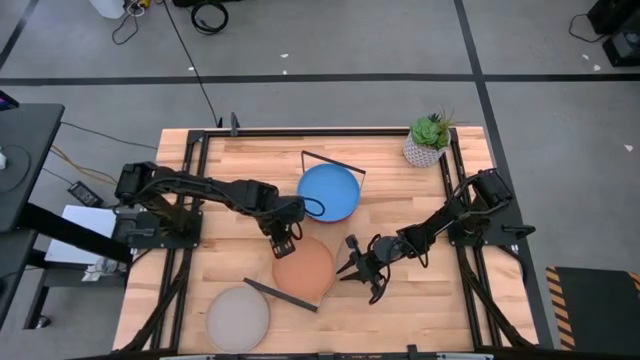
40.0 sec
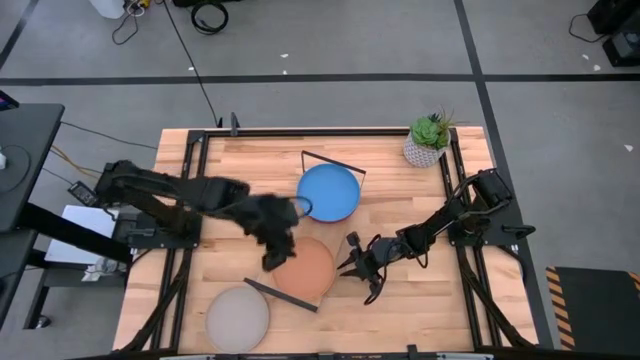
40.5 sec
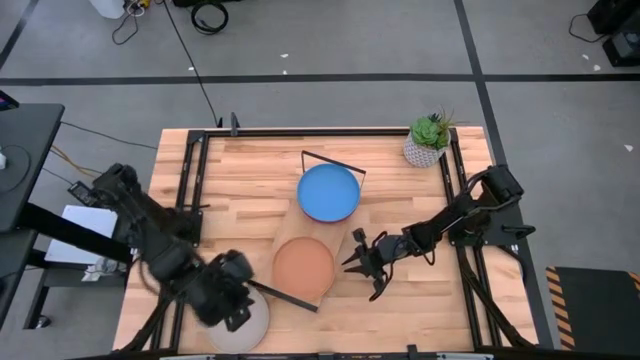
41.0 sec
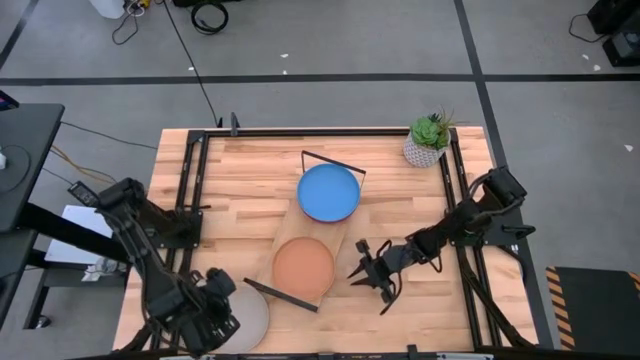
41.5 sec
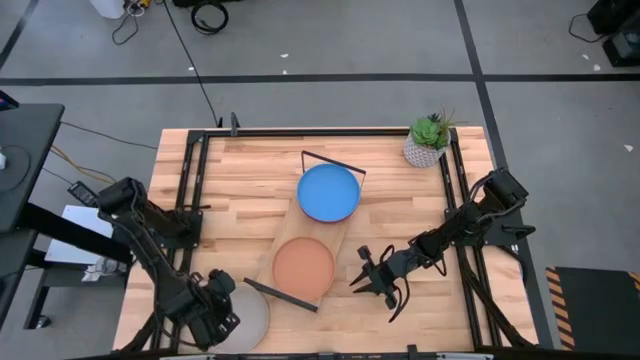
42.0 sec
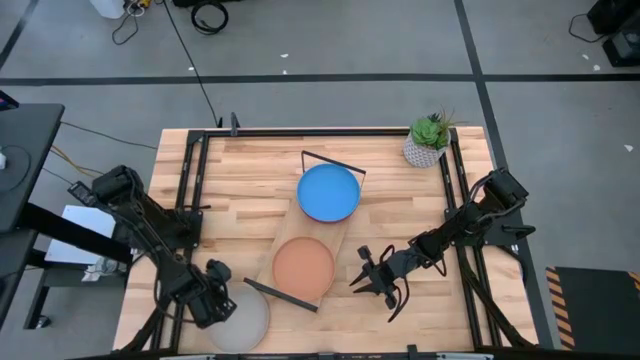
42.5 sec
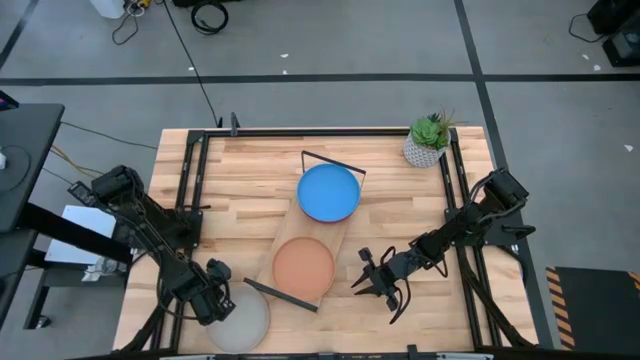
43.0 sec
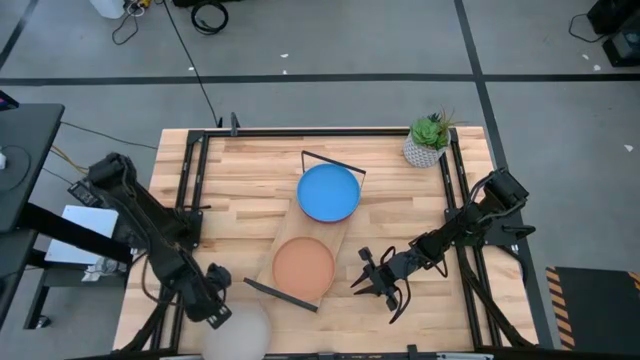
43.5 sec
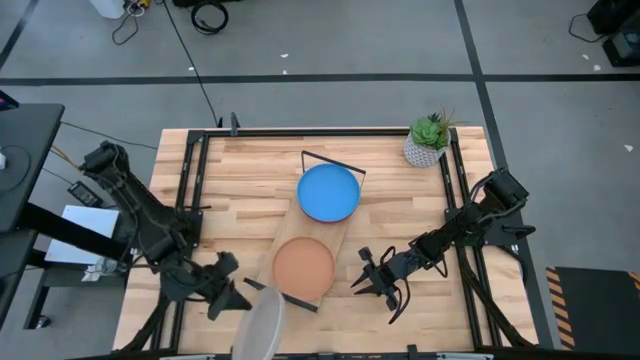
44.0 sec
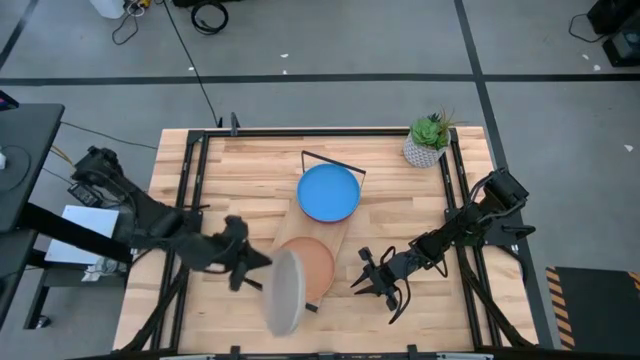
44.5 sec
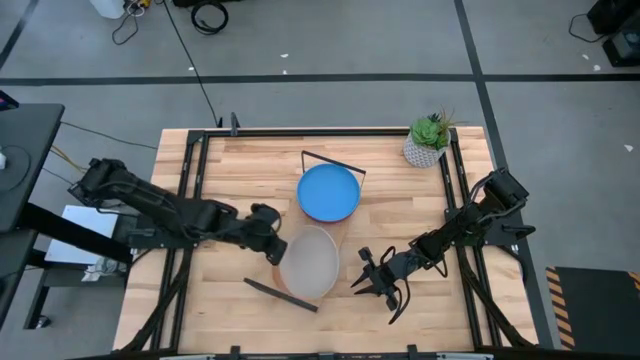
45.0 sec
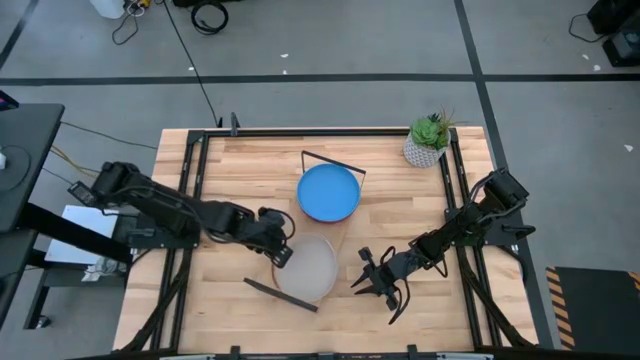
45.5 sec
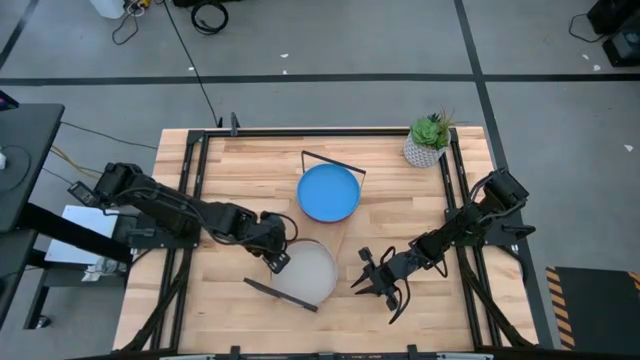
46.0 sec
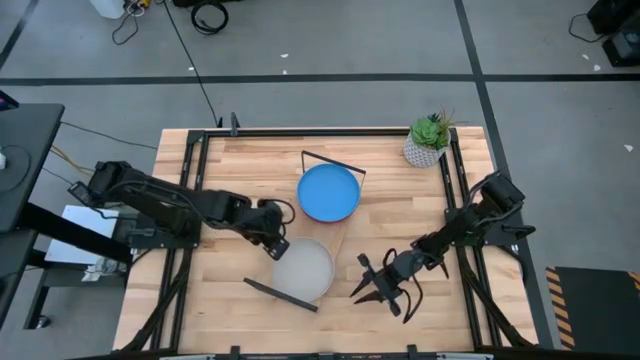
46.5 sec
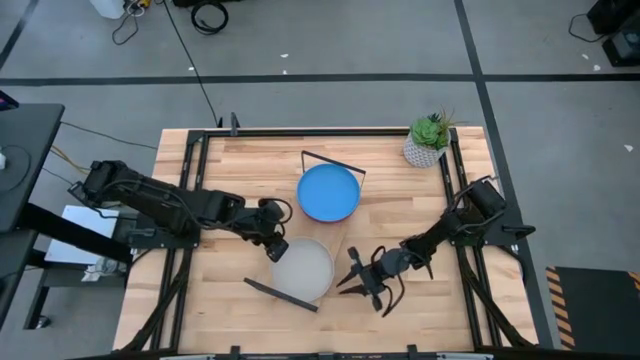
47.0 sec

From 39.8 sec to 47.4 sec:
Task: Place and stack plates onto a shelf
Stack the gray plate on top of the brown plate on the shelf

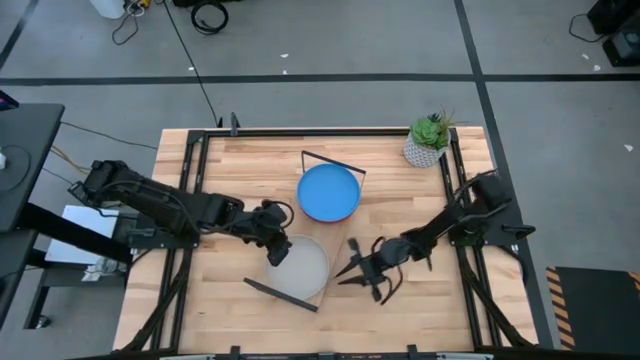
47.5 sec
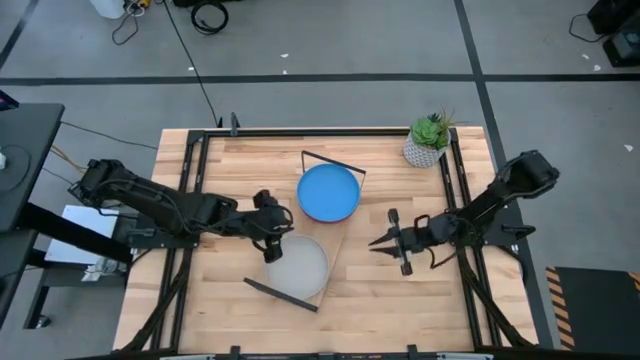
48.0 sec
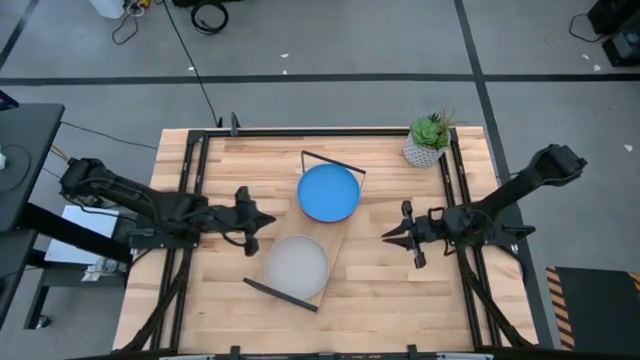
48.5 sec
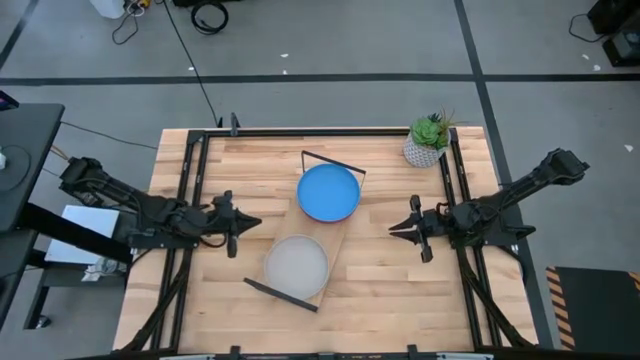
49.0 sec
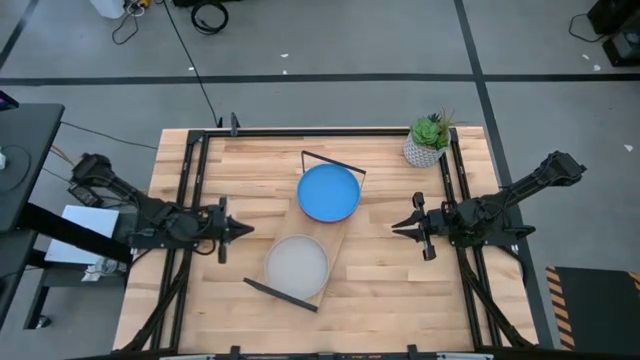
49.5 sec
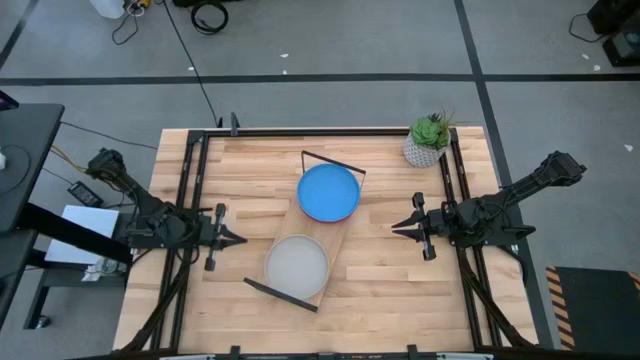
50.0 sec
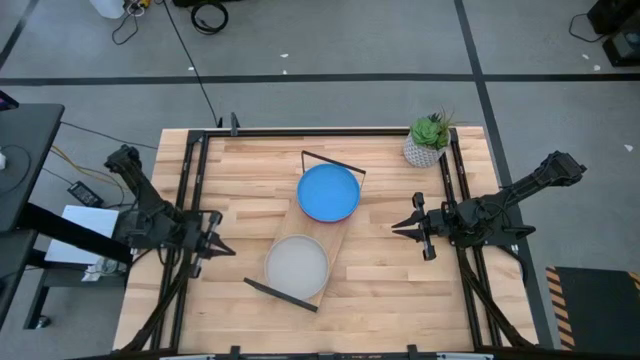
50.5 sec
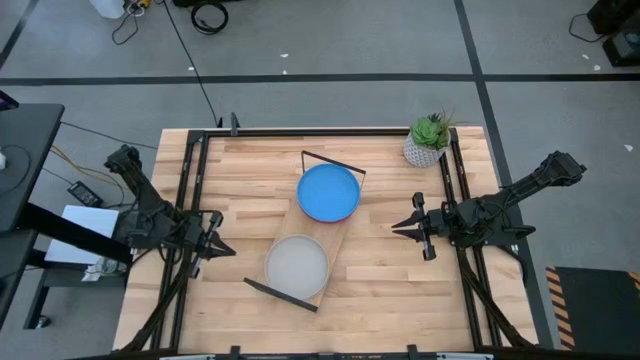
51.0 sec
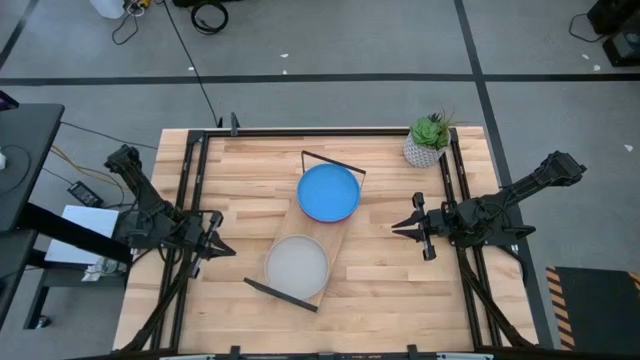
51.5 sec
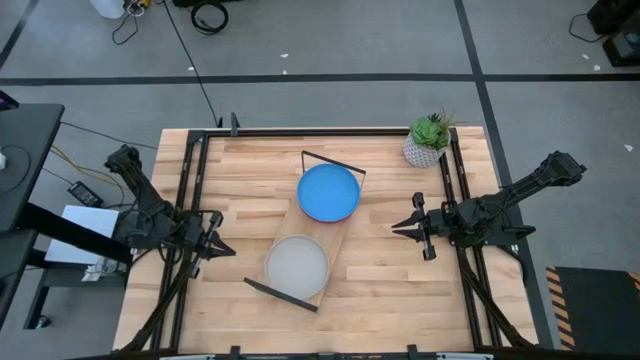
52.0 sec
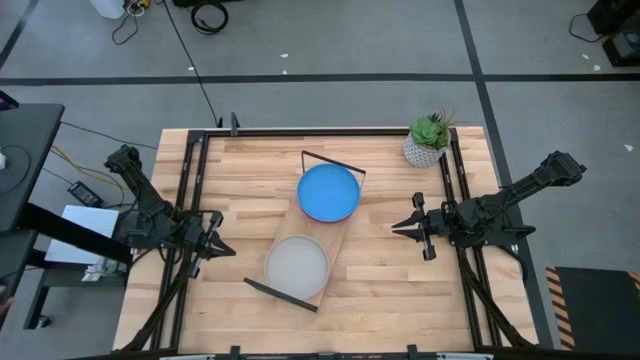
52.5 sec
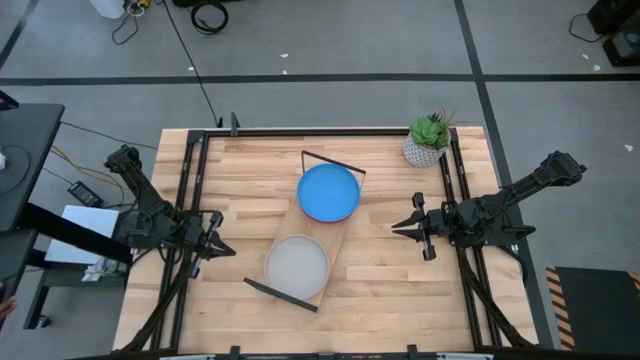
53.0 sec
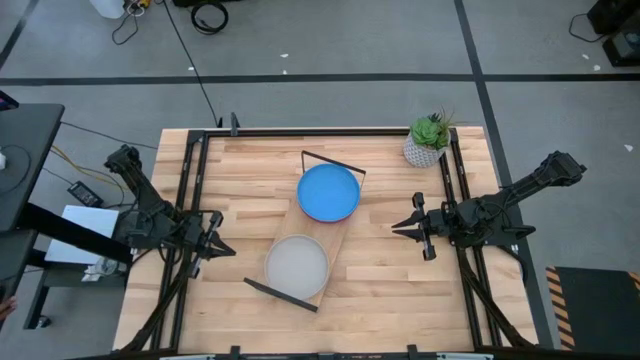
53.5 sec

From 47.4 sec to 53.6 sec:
Return to Home Position

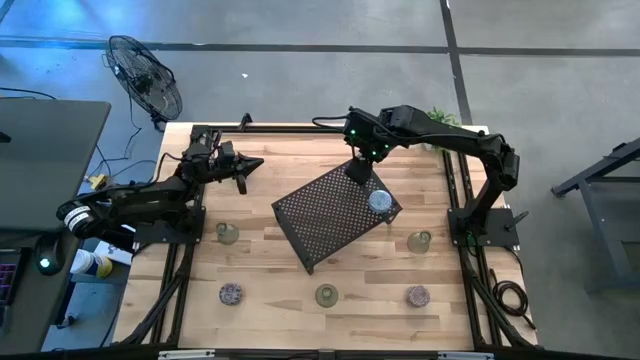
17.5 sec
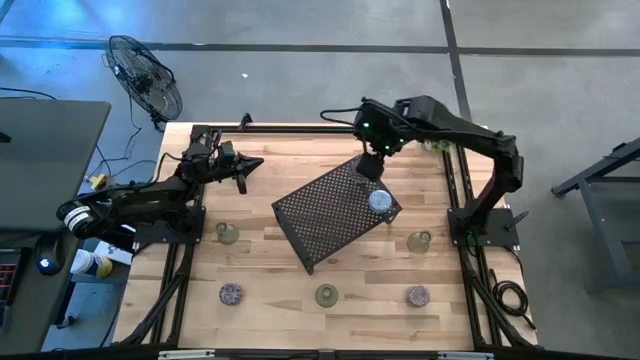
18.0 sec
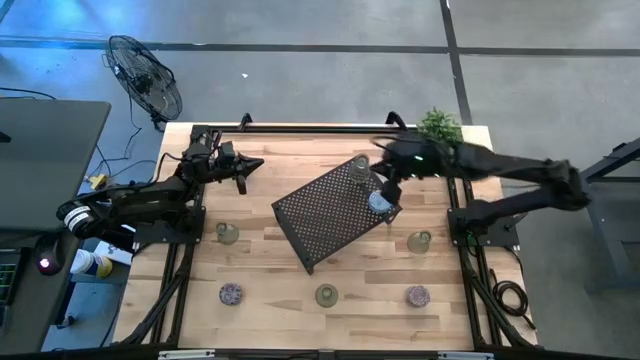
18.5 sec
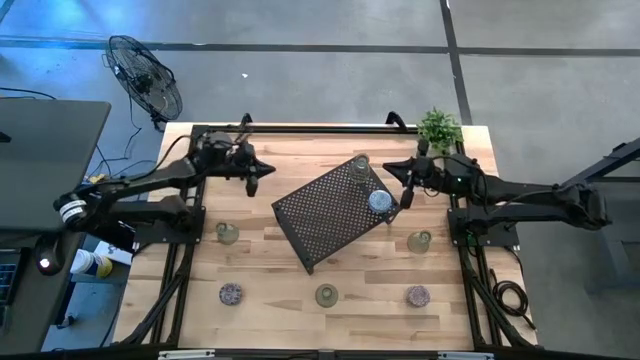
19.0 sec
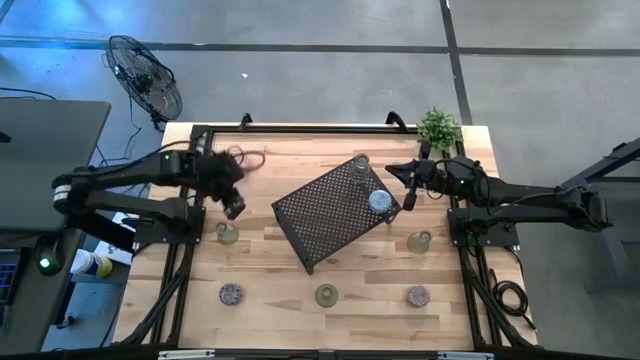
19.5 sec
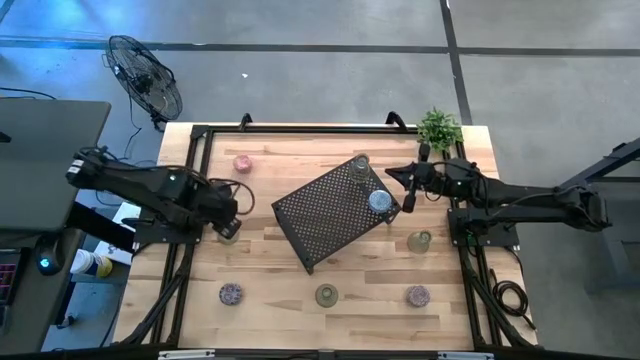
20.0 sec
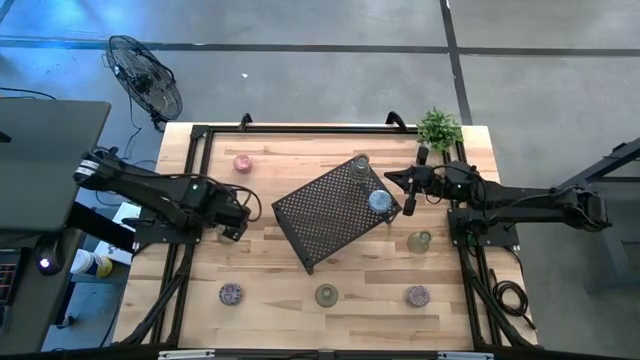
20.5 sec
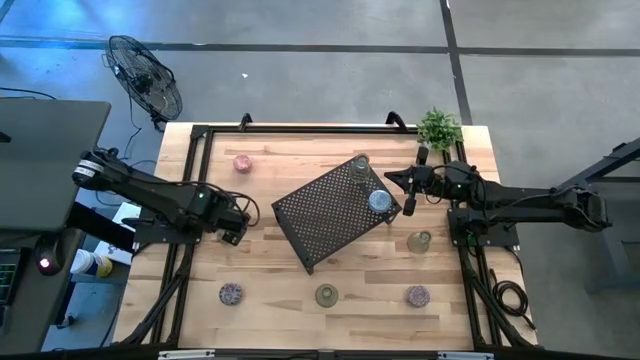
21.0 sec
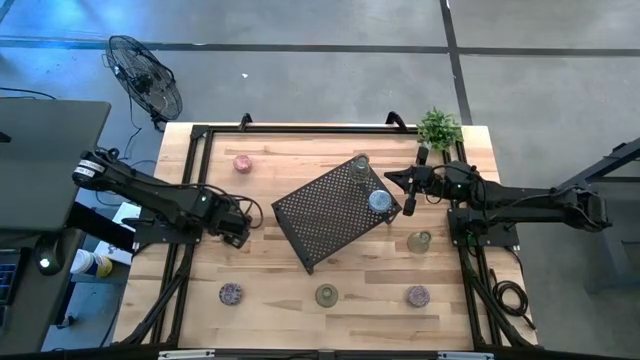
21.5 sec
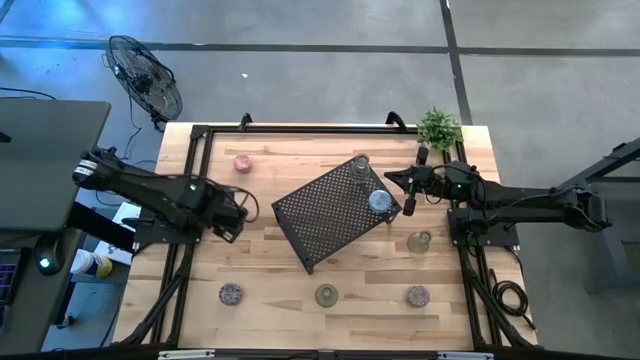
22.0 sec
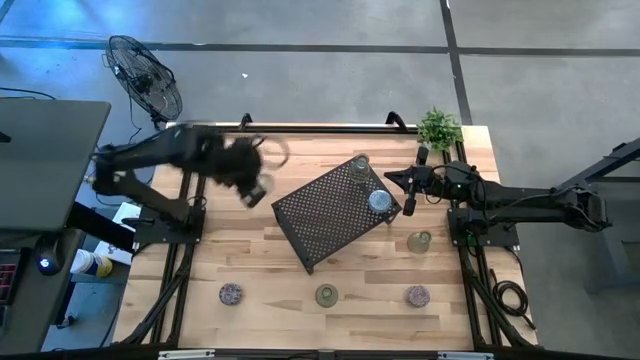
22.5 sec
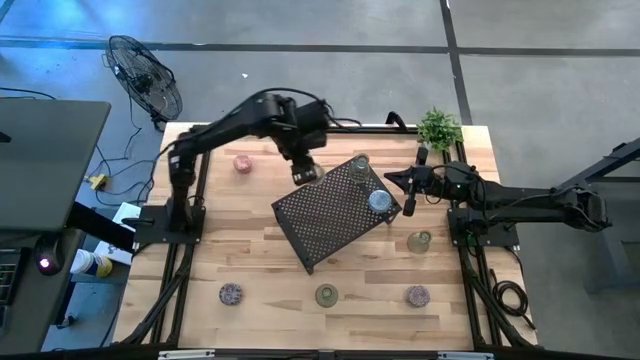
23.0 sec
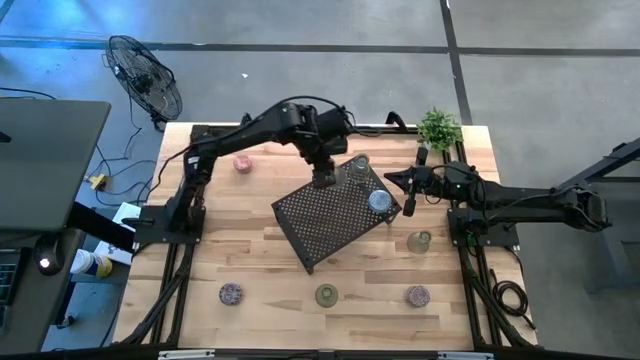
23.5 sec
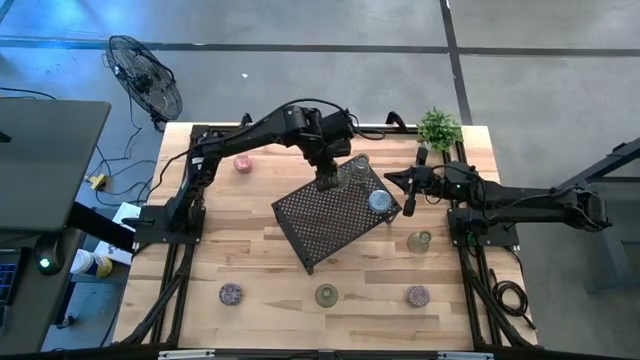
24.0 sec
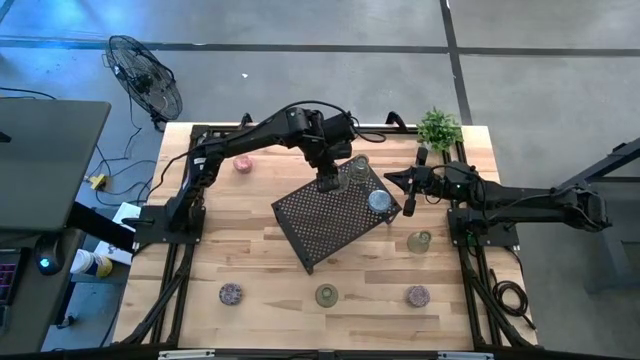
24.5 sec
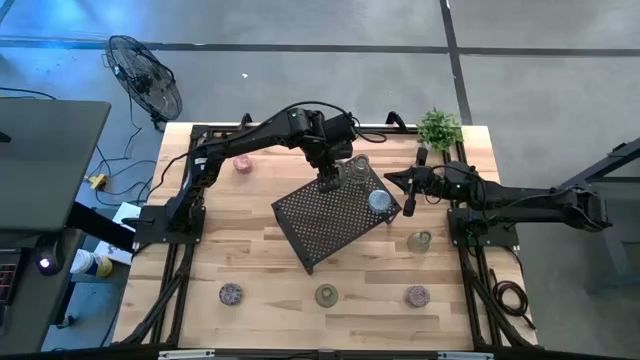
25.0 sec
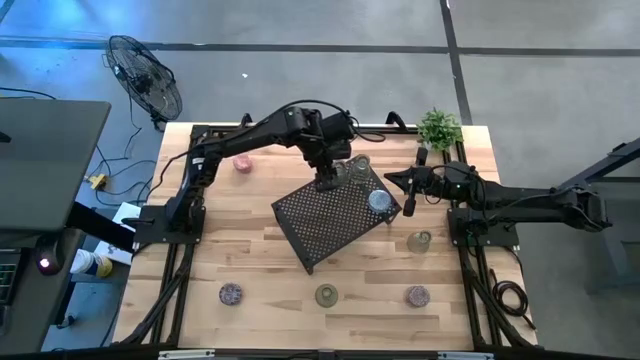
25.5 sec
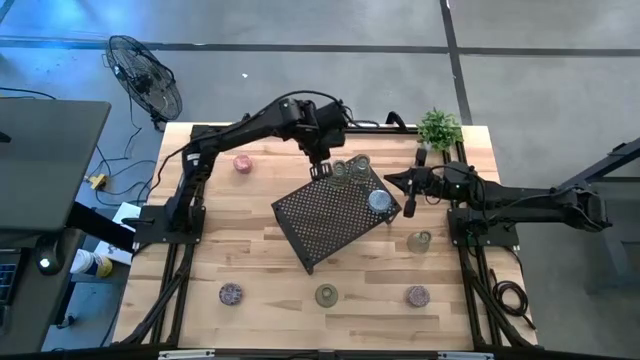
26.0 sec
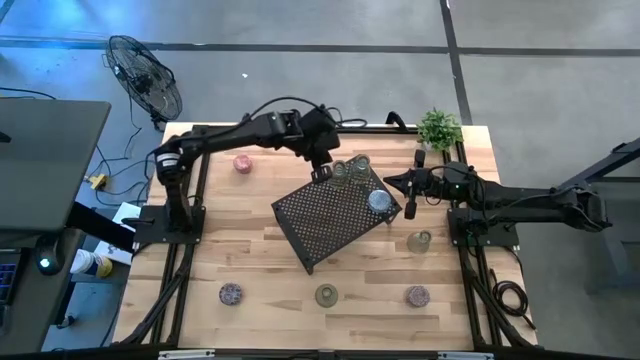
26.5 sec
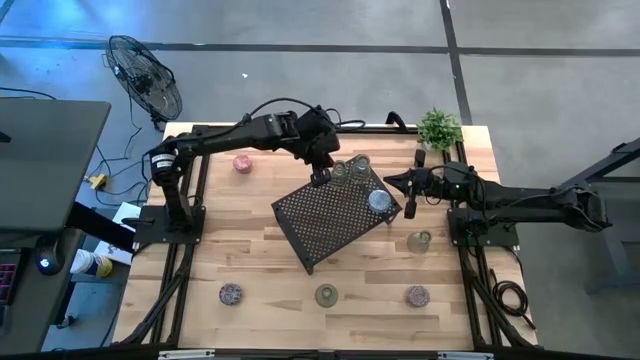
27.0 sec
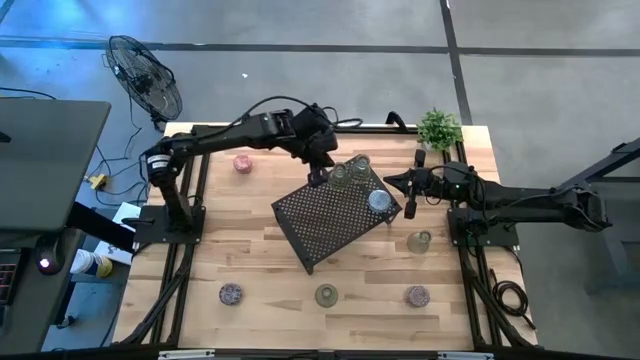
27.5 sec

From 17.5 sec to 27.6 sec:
Task: Pick & Place candle stick holders
Put the left green glass candle holder on the shelf
